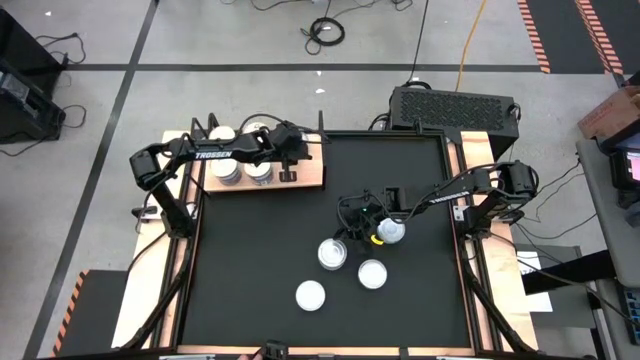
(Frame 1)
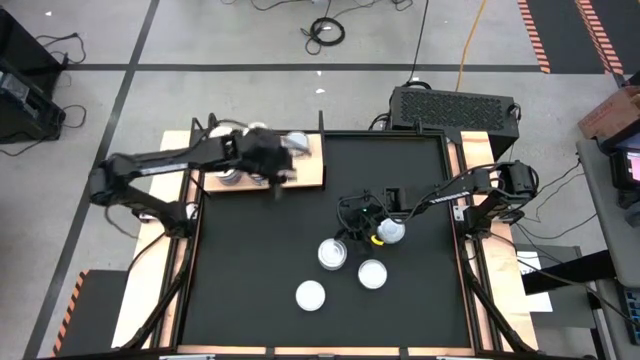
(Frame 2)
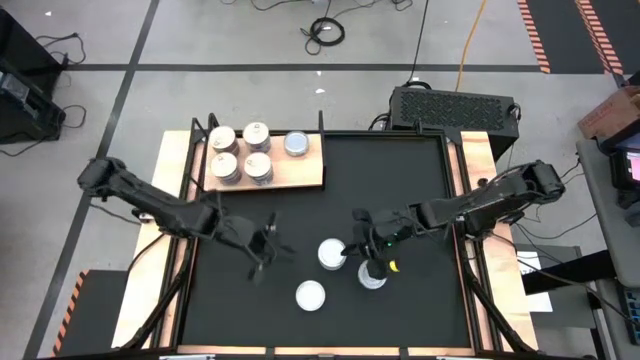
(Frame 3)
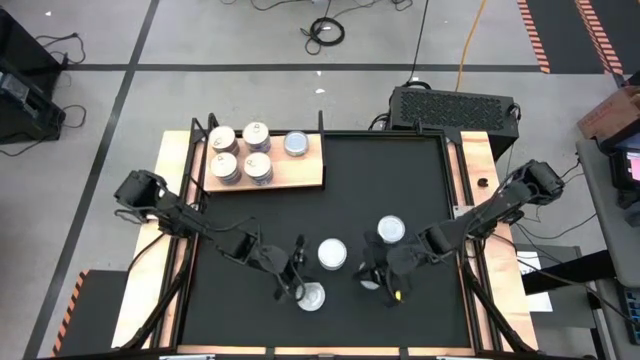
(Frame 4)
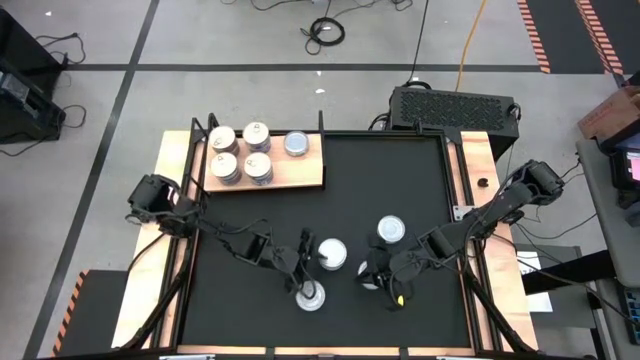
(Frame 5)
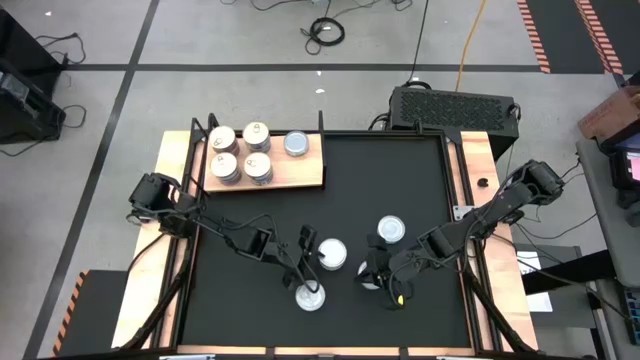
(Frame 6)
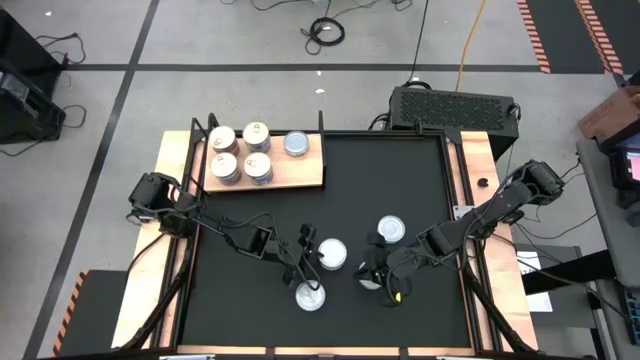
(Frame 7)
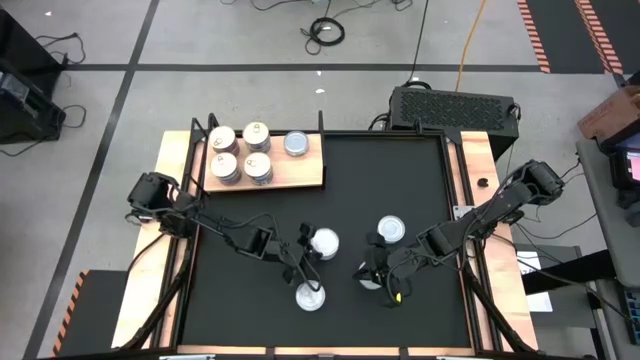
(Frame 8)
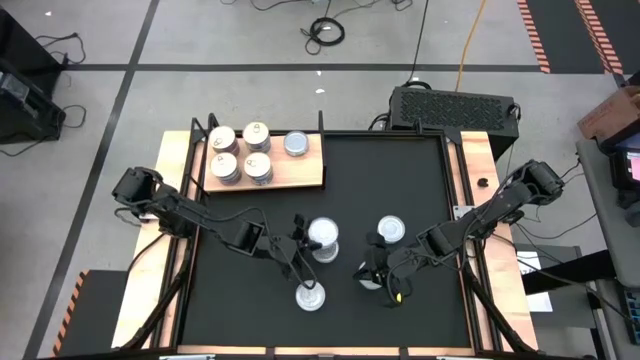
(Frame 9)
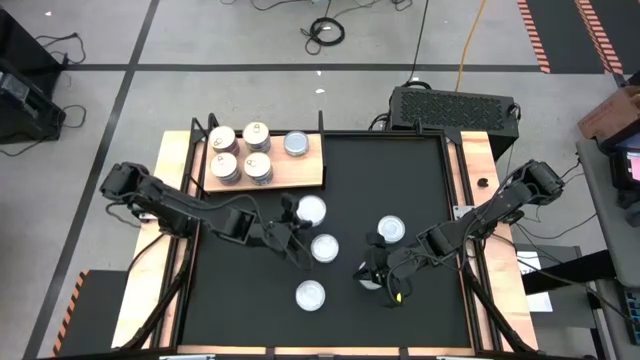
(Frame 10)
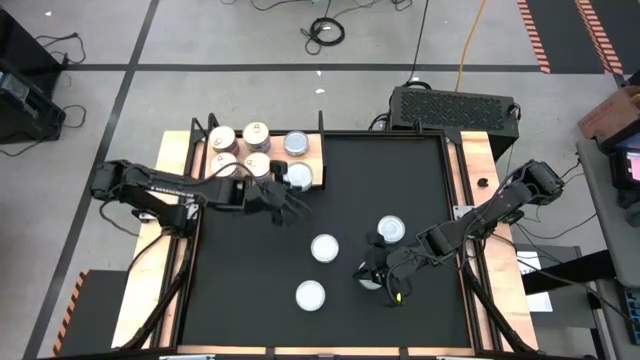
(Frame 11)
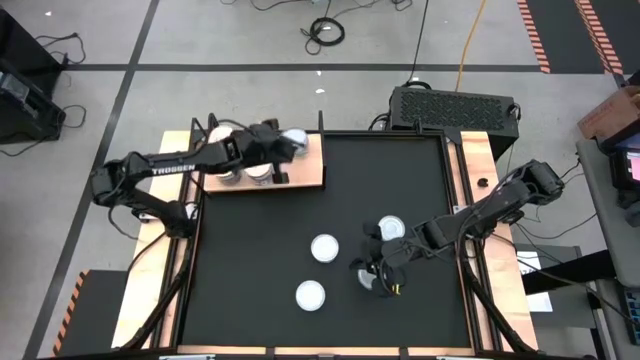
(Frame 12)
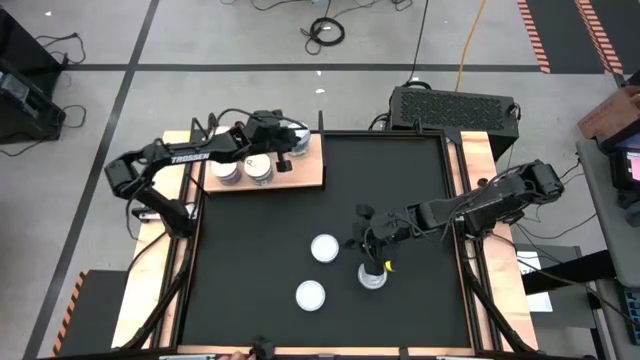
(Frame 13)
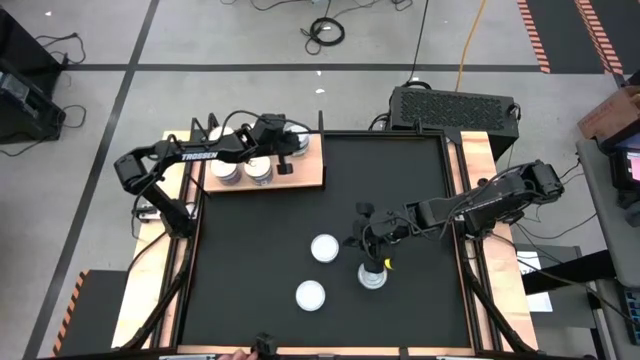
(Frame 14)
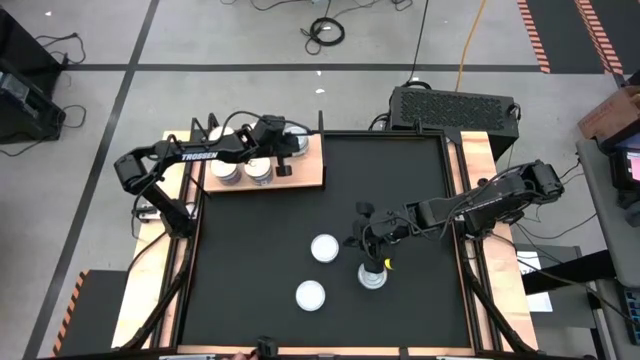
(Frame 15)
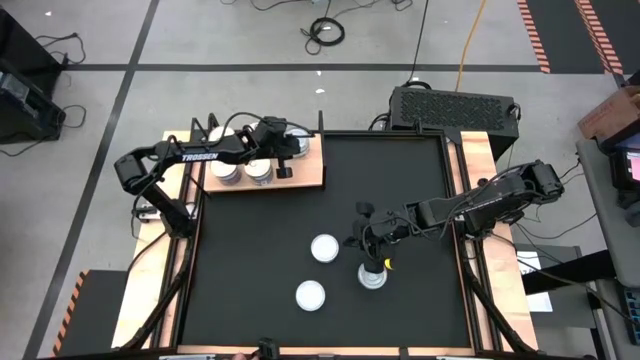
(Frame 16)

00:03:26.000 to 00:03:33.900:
Task: Stack canned seafood by type on shelf
Stack the green tuna can on top of the green tuna can on the shelf

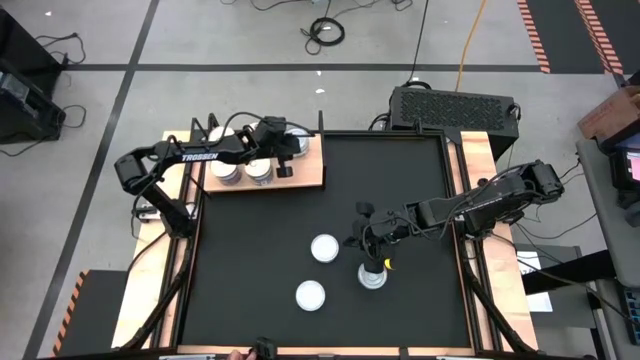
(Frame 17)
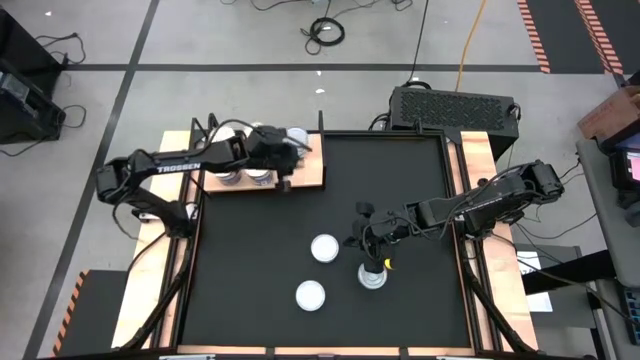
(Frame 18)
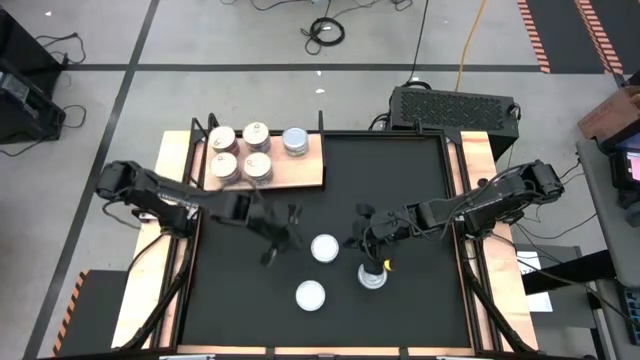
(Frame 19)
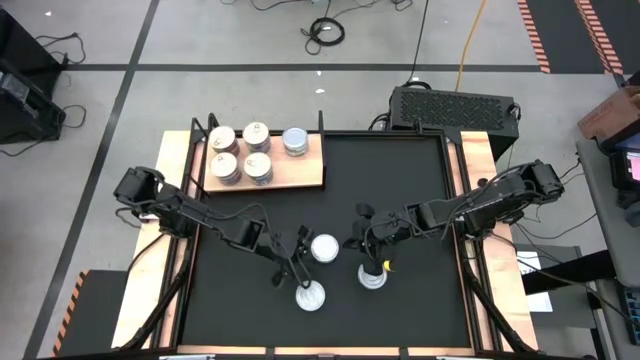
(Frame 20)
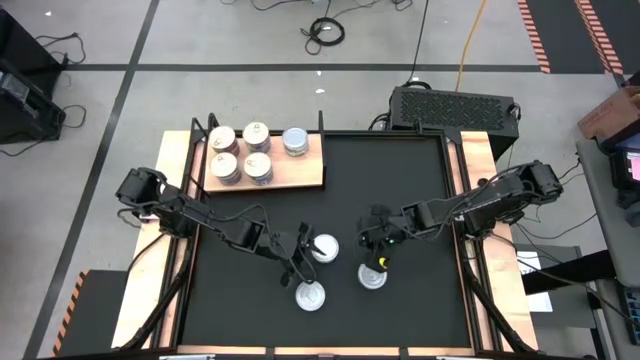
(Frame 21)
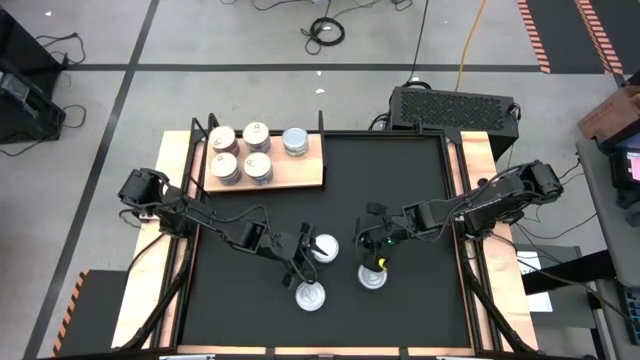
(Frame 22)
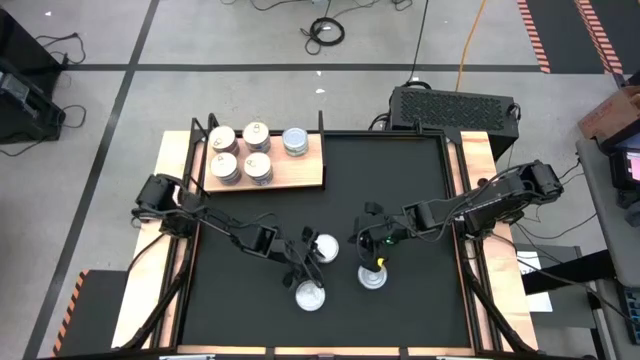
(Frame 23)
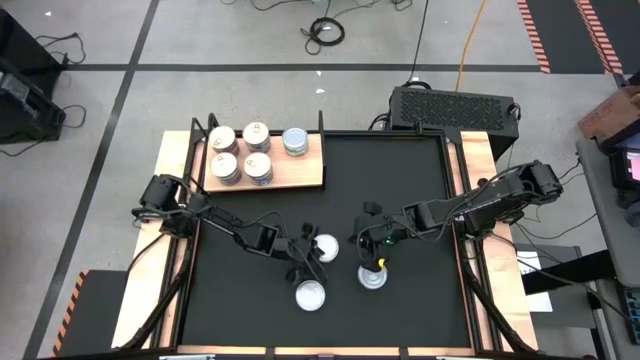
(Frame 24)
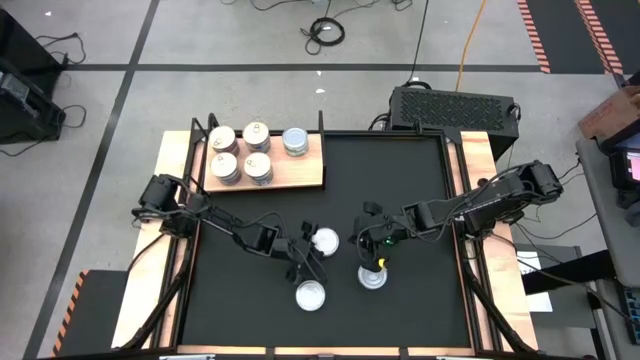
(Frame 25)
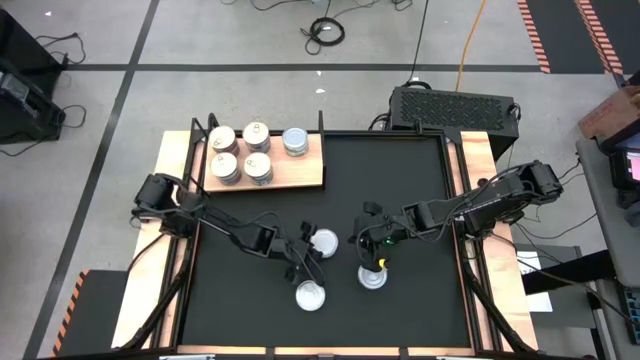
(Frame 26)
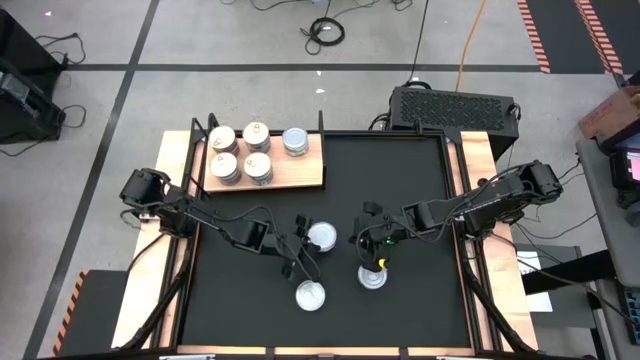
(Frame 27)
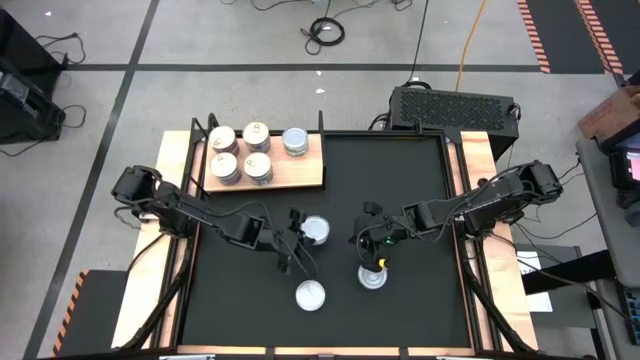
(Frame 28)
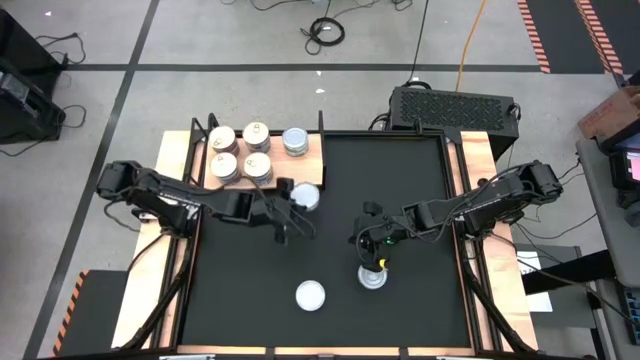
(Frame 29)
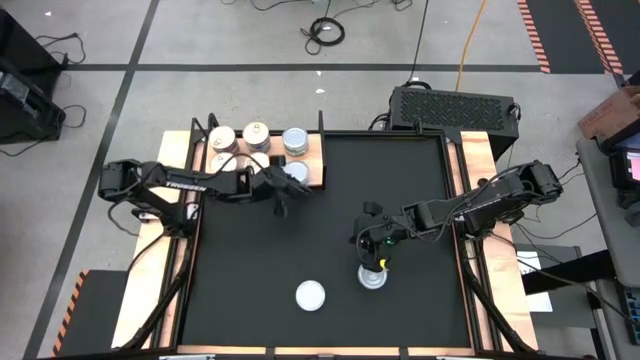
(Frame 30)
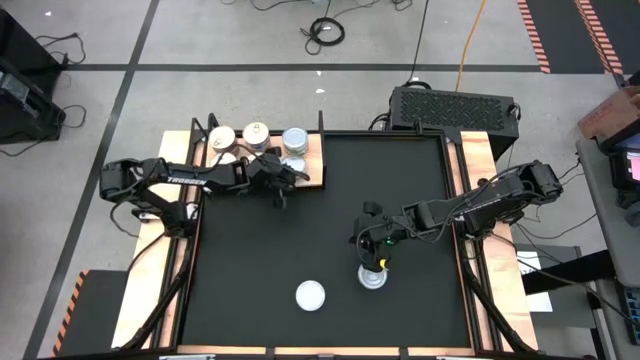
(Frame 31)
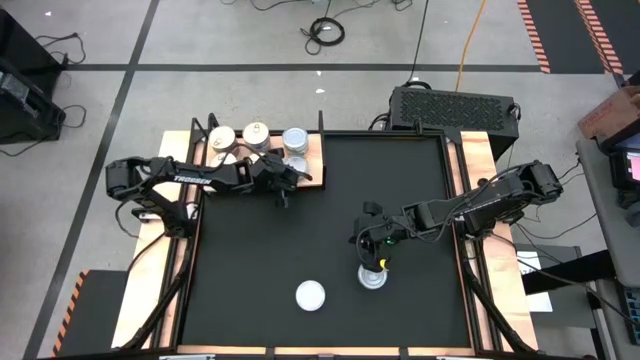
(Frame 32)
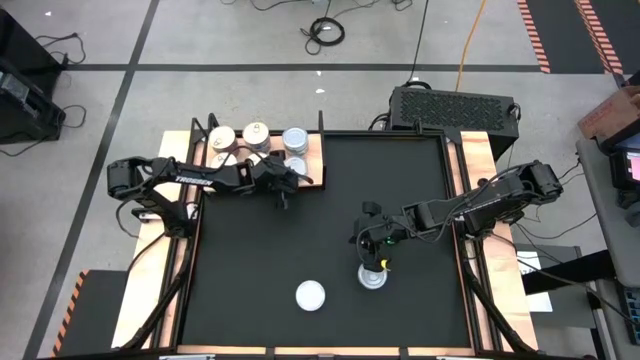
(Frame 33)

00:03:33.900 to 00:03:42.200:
Put the green tuna can on the bottom right of the shelf

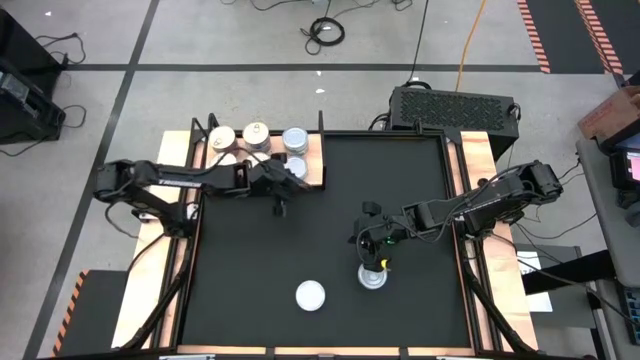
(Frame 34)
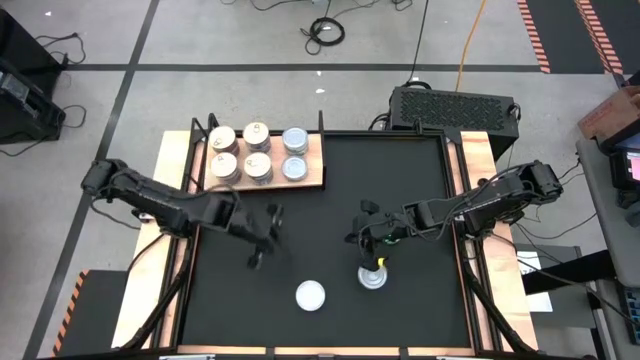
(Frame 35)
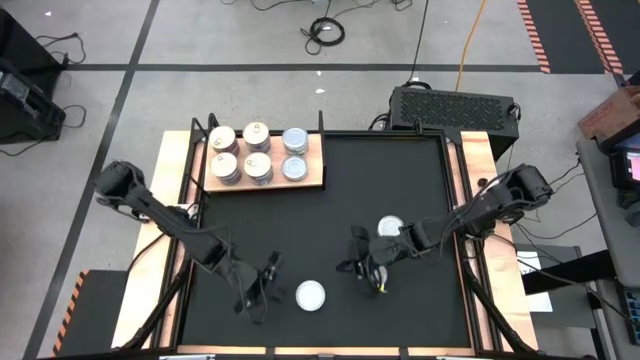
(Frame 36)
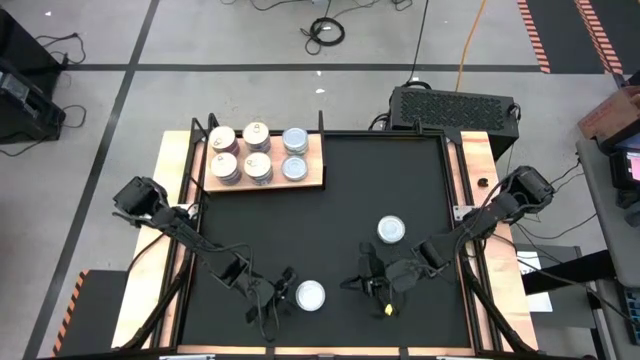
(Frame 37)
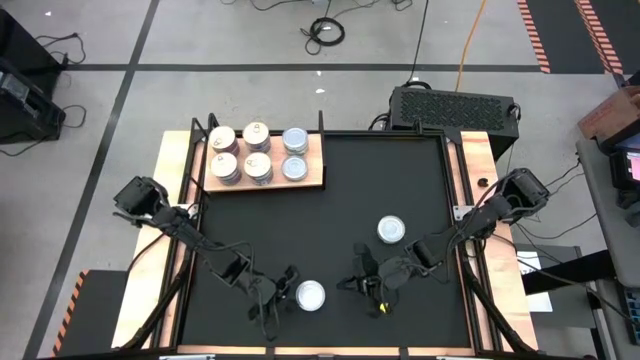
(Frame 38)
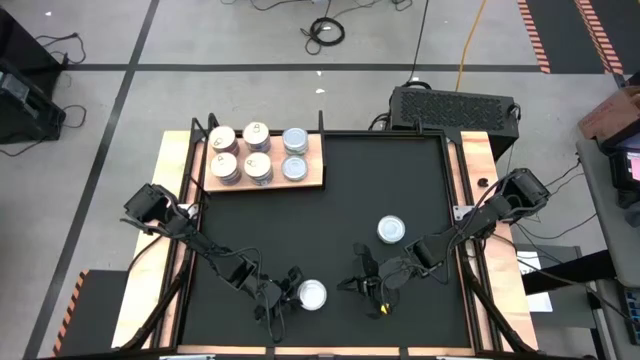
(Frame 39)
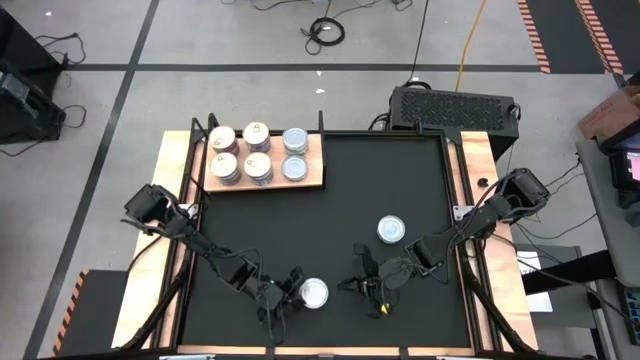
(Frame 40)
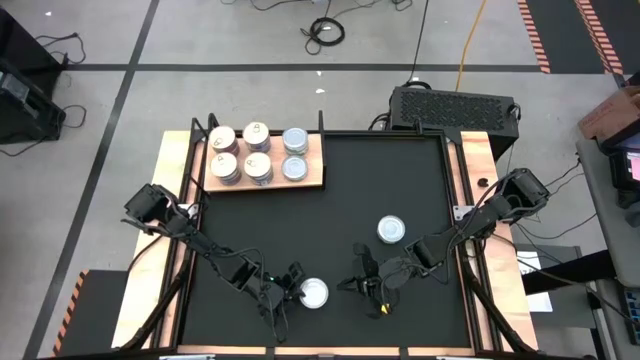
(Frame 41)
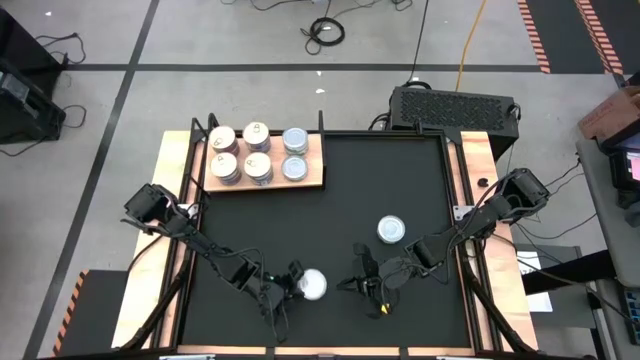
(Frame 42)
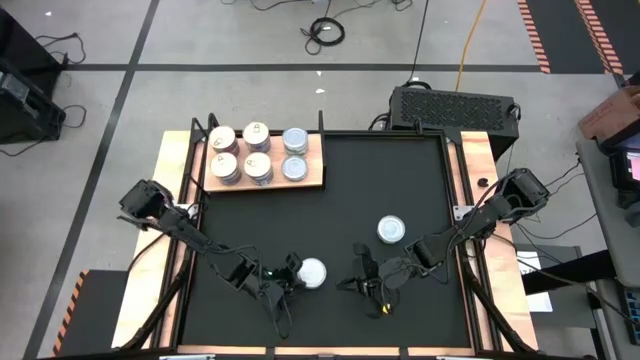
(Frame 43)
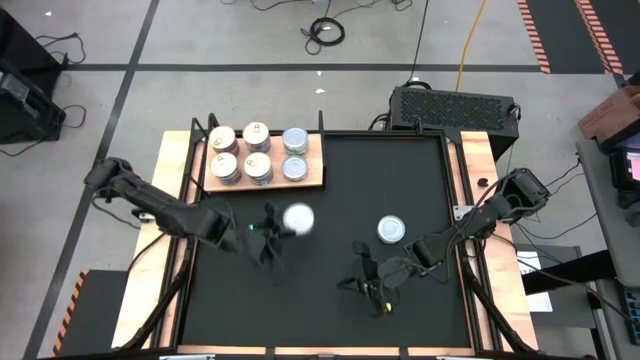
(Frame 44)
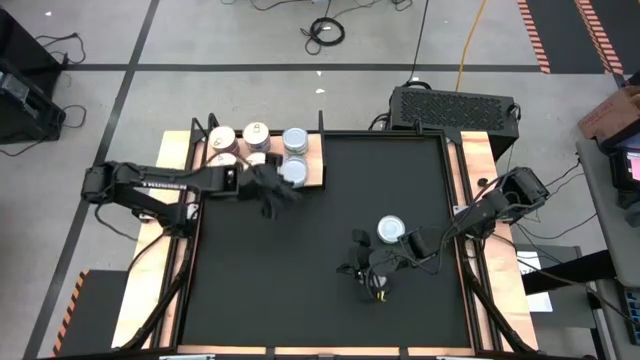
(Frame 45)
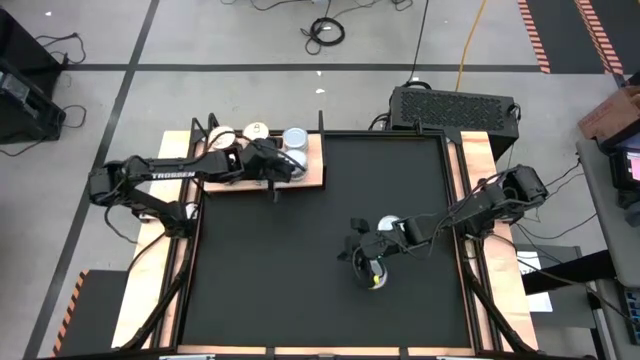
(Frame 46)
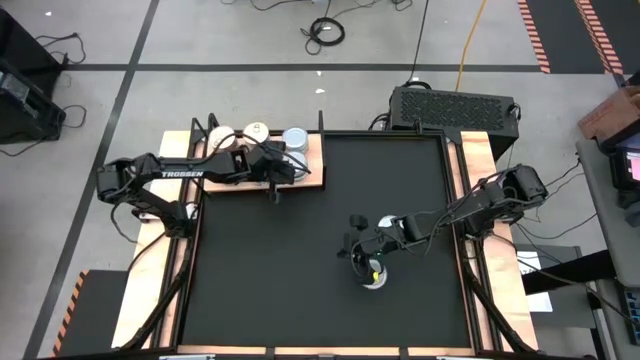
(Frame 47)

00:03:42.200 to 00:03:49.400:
Stack the bottom green tuna can on the bottom green tuna can on the shelf
